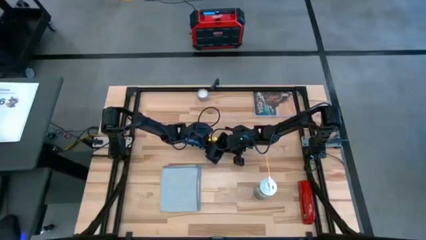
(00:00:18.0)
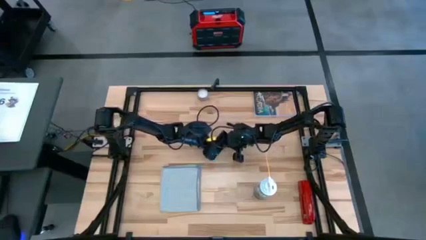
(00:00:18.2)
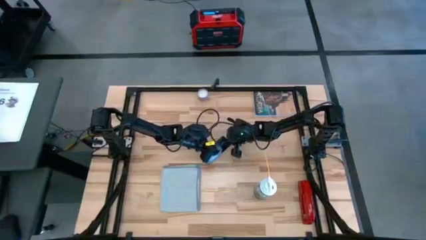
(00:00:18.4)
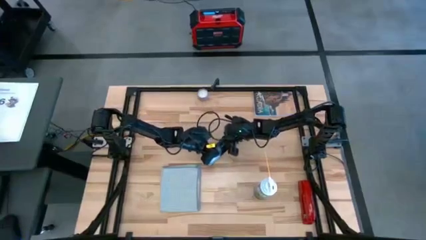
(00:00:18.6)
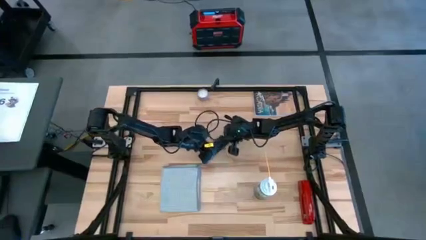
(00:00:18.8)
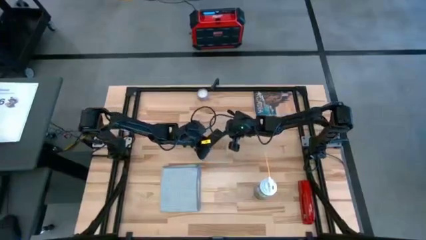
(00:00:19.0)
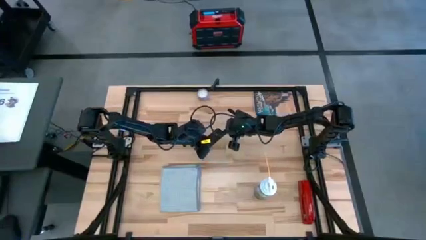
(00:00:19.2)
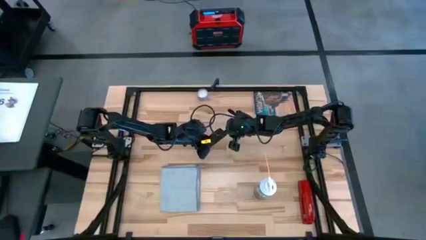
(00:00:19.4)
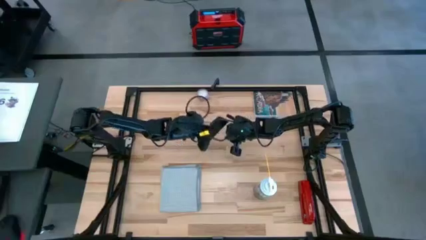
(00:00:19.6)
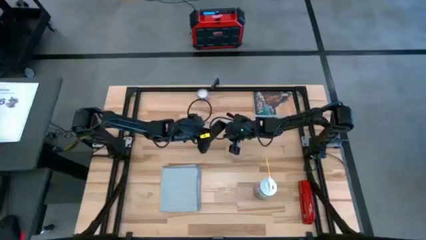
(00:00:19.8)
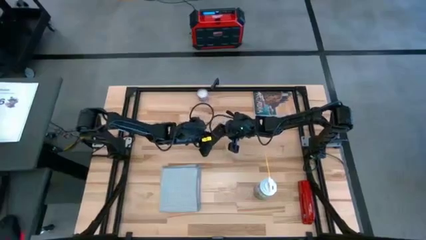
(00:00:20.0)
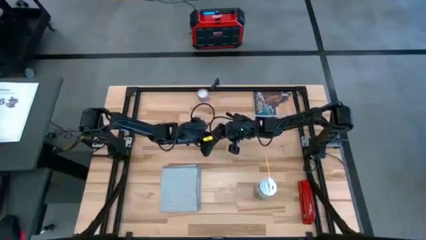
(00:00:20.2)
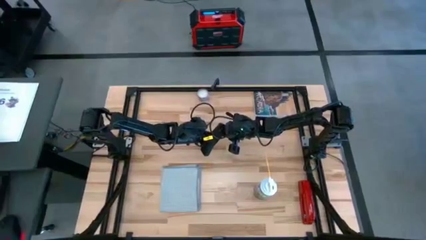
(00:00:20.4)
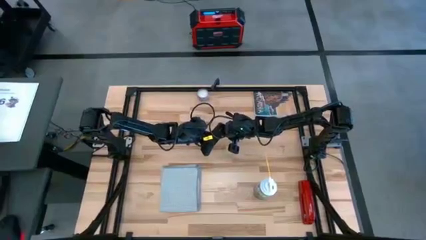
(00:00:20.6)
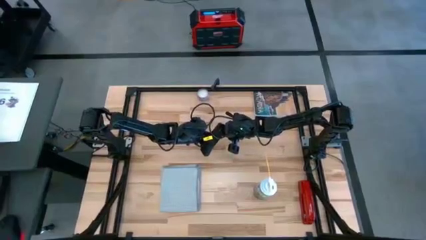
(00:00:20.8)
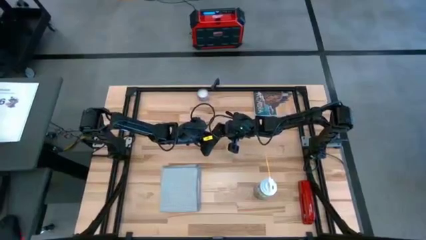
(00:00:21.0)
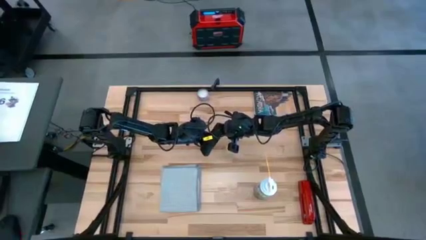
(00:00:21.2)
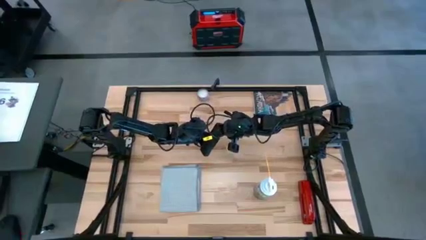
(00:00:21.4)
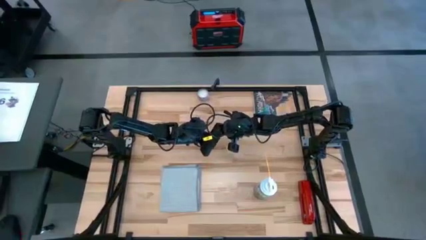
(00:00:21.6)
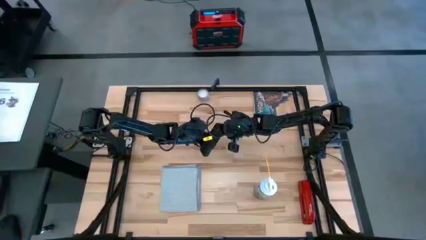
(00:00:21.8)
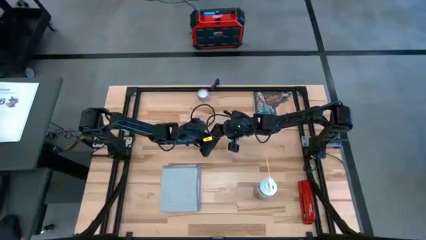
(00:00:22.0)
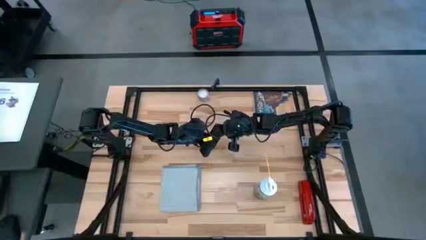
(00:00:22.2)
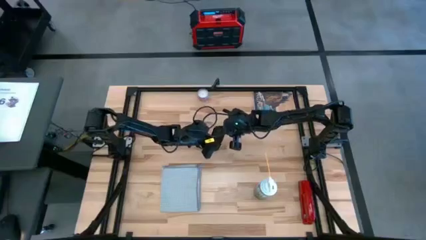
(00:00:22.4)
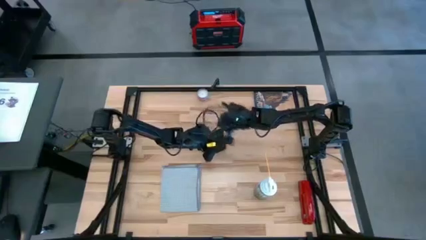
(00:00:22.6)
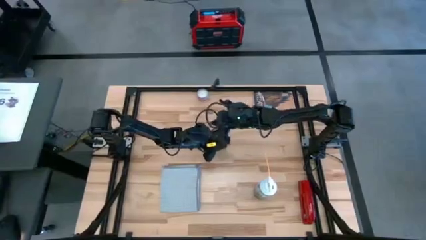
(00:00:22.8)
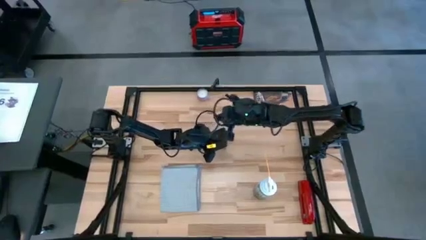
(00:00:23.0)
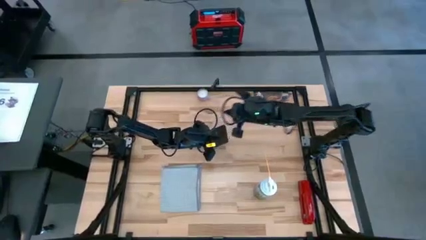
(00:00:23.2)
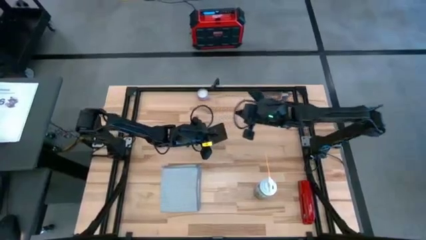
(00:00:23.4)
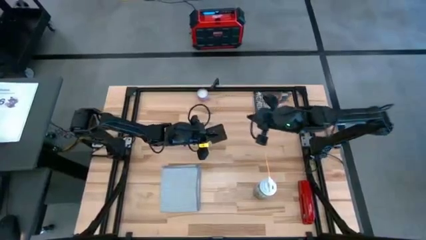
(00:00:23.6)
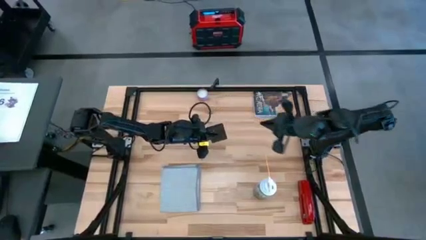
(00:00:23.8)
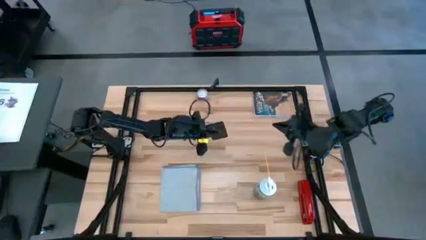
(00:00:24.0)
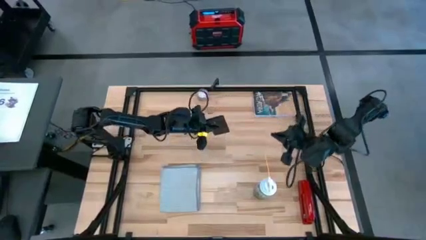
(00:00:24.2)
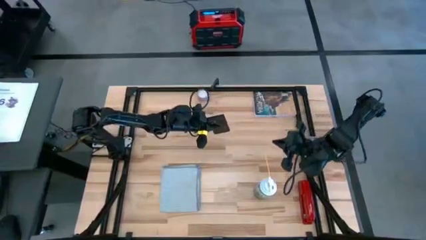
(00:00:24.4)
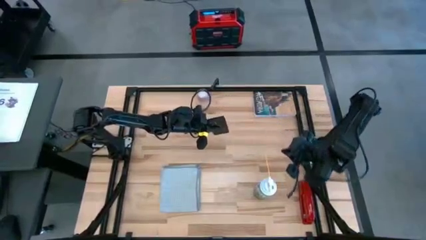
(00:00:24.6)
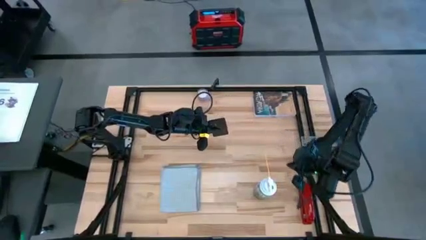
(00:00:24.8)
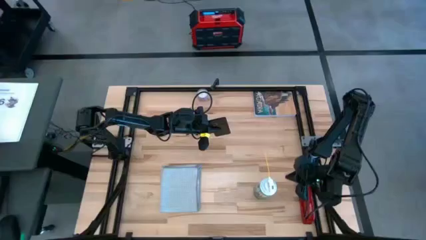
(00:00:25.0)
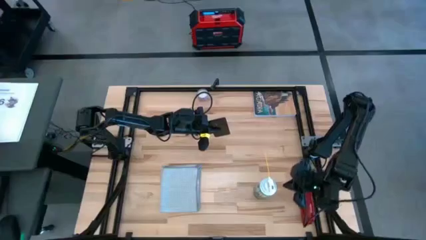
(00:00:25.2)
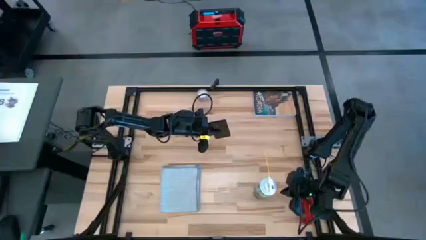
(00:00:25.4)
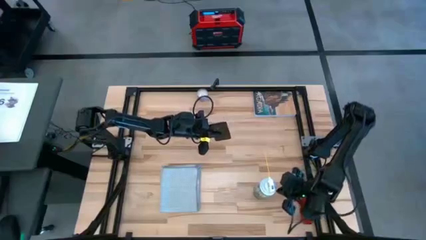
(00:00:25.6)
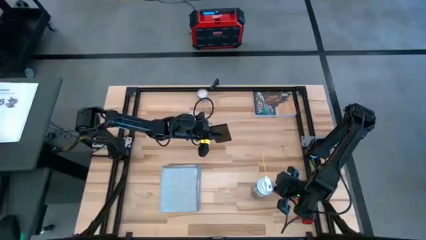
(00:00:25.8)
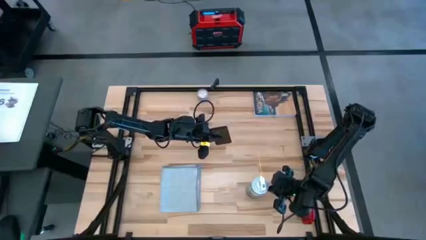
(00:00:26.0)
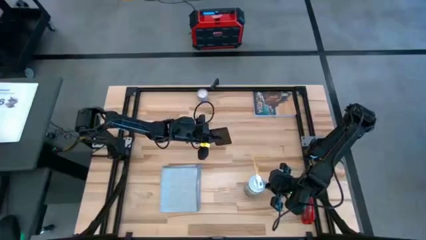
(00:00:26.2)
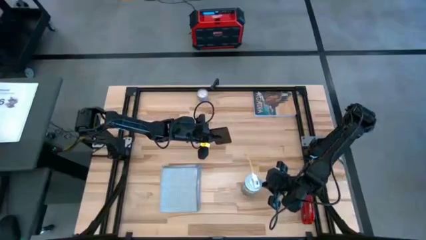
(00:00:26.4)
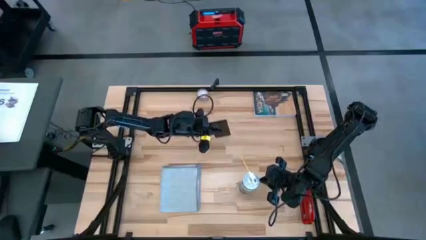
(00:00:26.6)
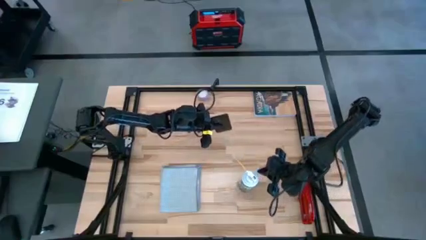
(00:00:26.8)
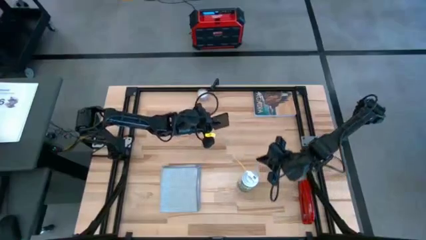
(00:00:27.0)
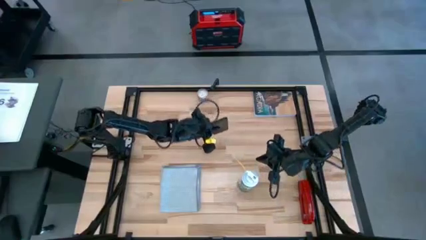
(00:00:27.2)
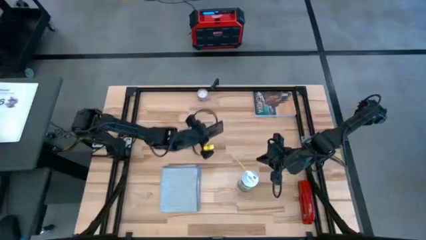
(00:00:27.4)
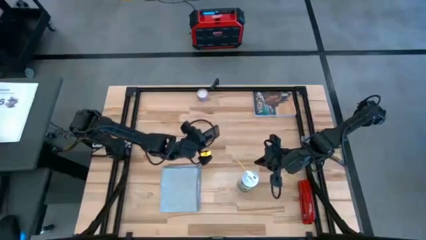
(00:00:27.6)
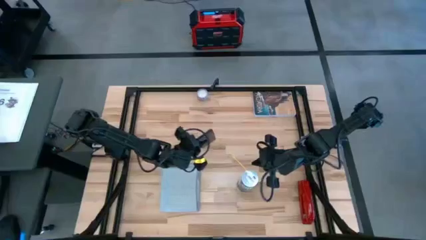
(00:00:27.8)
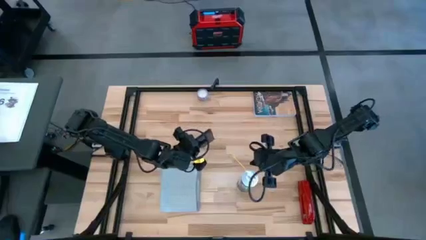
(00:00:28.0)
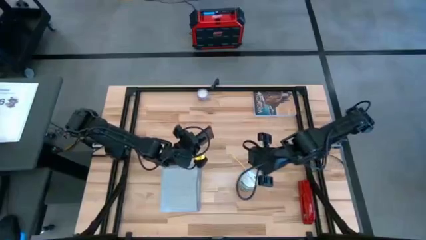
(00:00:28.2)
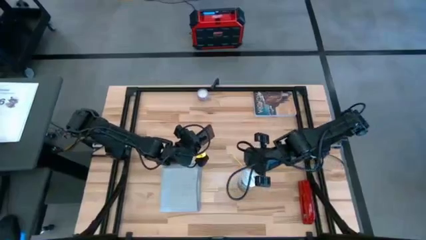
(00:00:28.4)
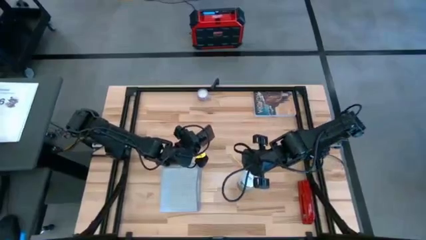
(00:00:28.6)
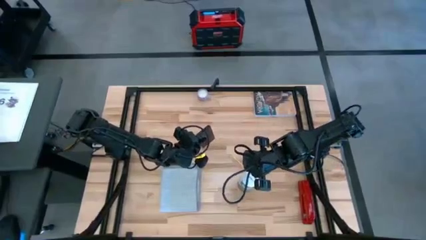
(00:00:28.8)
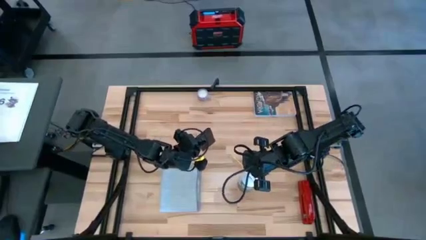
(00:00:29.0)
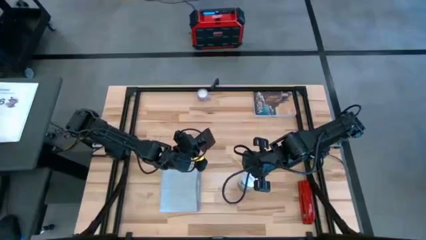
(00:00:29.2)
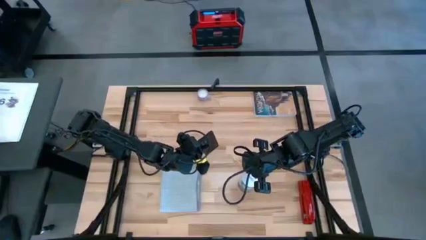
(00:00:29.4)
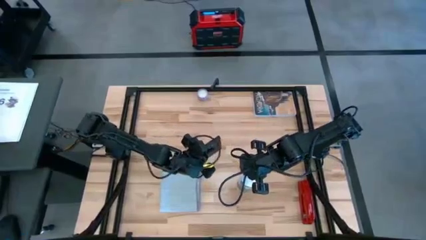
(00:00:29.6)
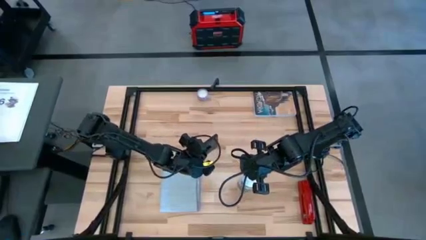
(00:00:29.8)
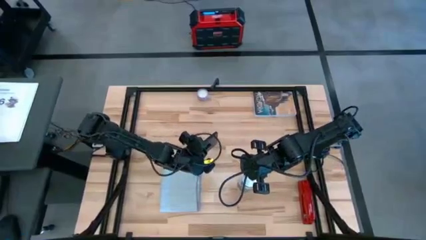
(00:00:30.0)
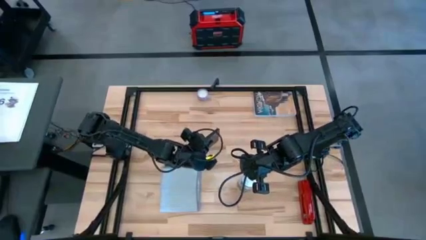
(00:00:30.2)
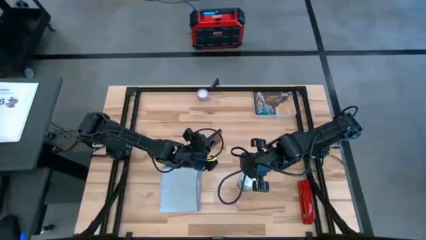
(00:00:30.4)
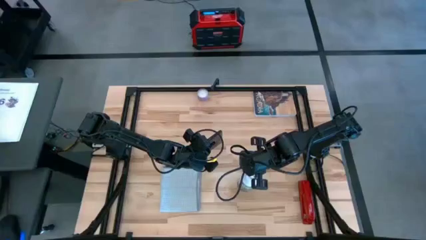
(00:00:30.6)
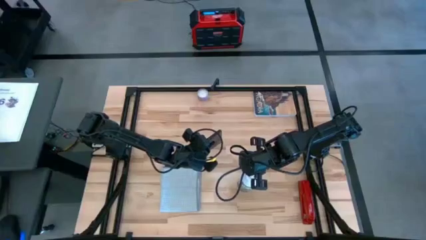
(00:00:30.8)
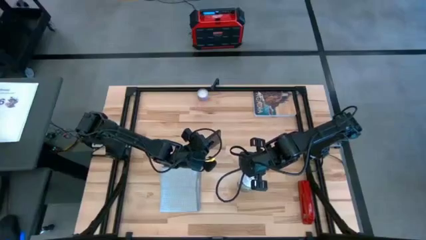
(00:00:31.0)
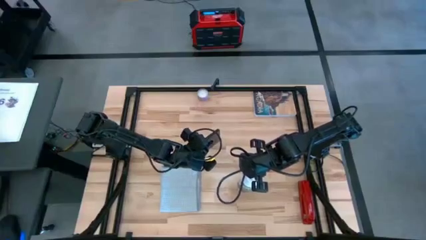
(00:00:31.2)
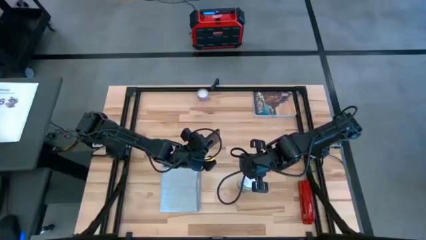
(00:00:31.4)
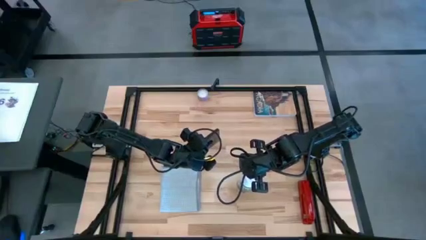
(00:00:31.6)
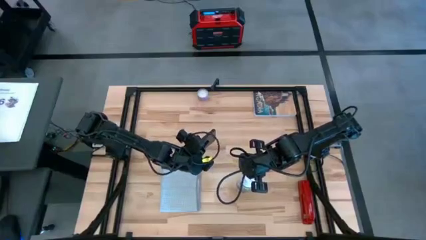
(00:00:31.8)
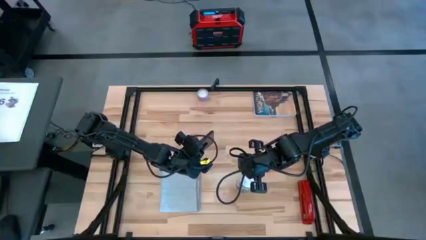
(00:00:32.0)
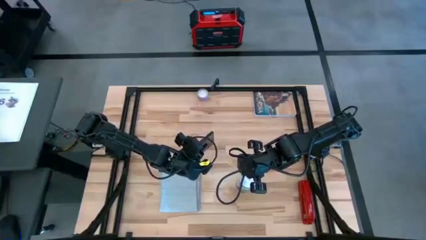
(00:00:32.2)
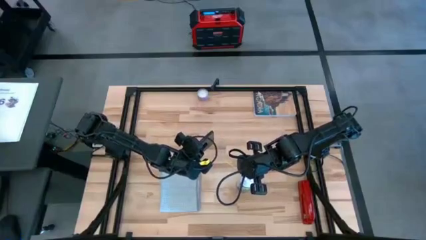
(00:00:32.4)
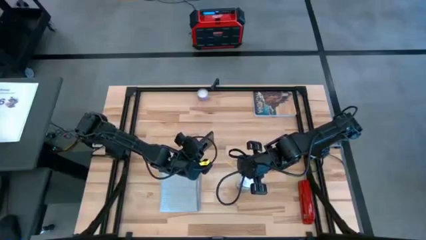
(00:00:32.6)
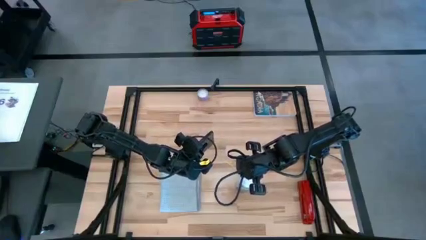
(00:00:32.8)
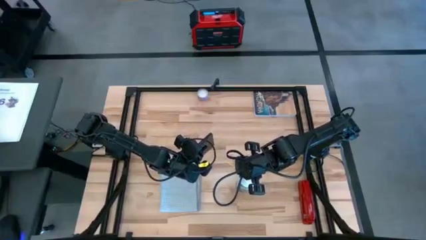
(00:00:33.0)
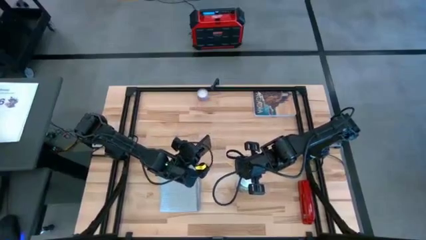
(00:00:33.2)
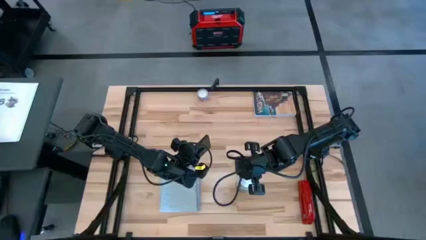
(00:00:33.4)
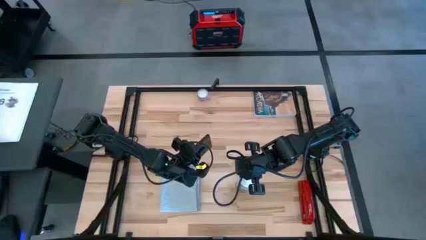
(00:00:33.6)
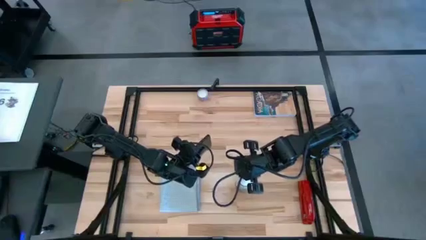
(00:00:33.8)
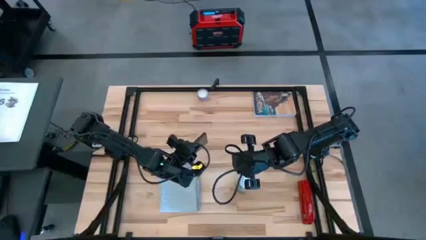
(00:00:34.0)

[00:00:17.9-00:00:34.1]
Task: Apply microfiber cloth
Spray the back of the cellphone with the cleaning bottle
